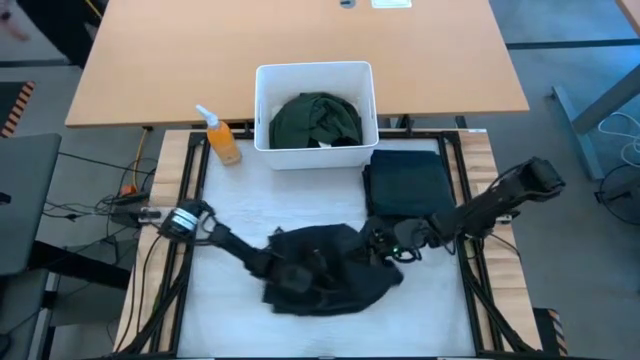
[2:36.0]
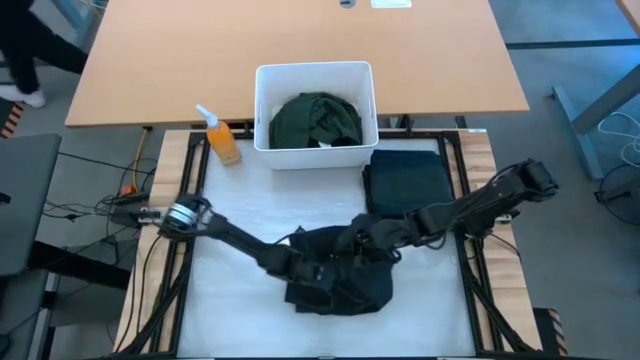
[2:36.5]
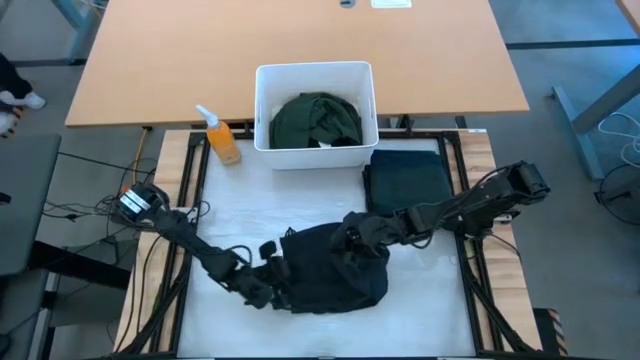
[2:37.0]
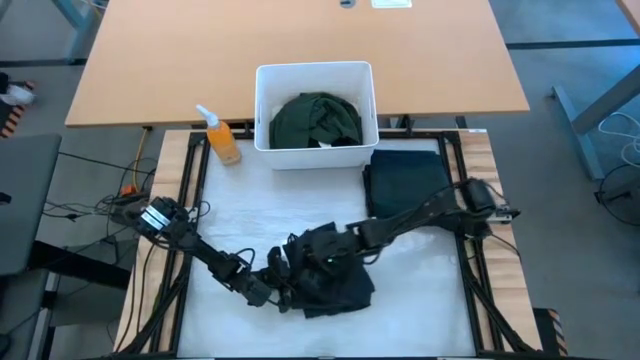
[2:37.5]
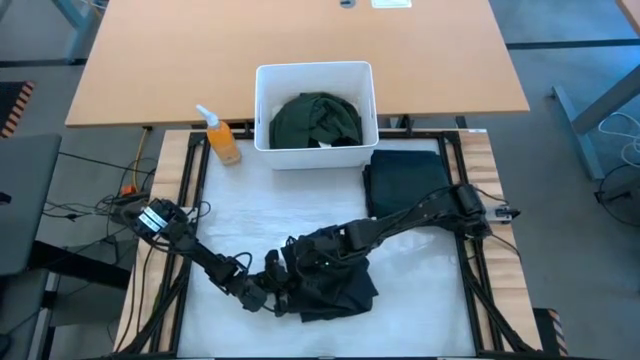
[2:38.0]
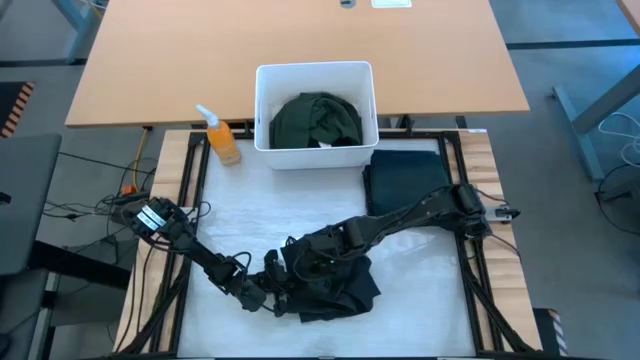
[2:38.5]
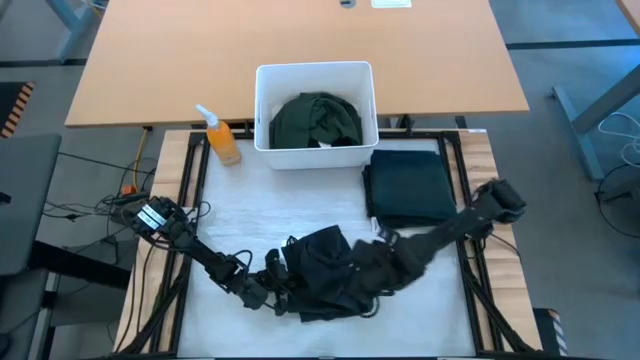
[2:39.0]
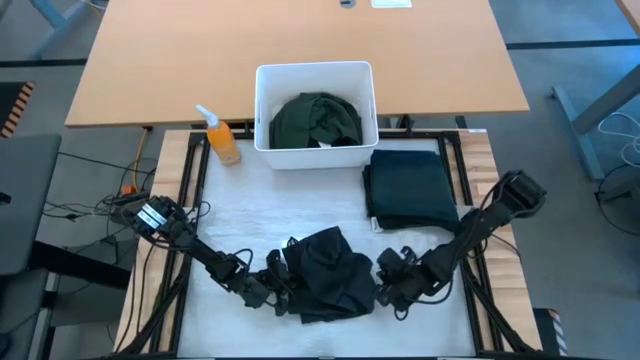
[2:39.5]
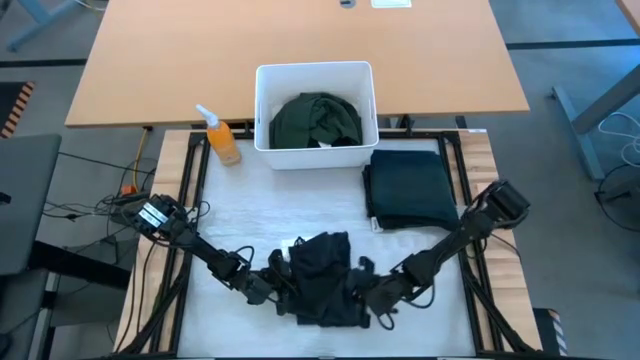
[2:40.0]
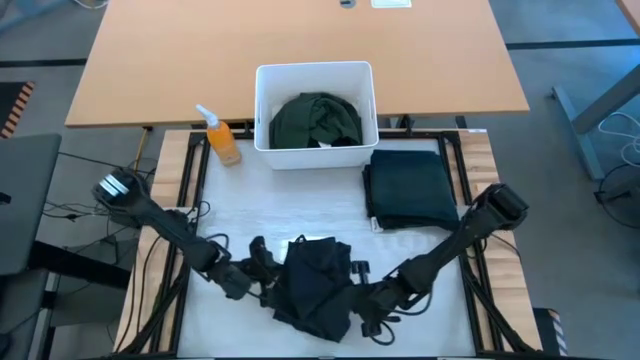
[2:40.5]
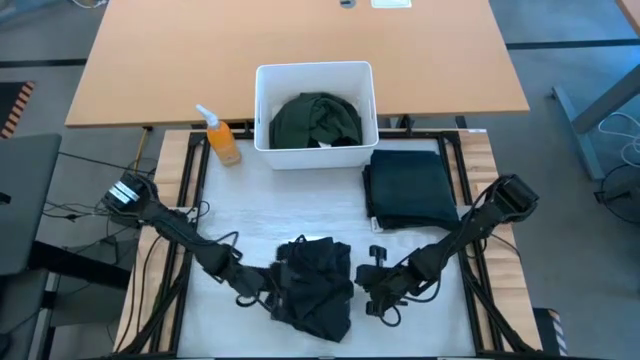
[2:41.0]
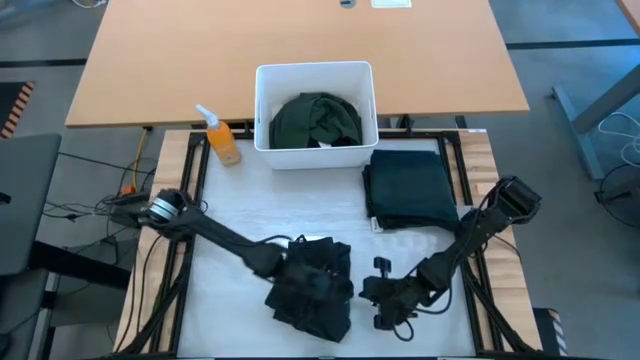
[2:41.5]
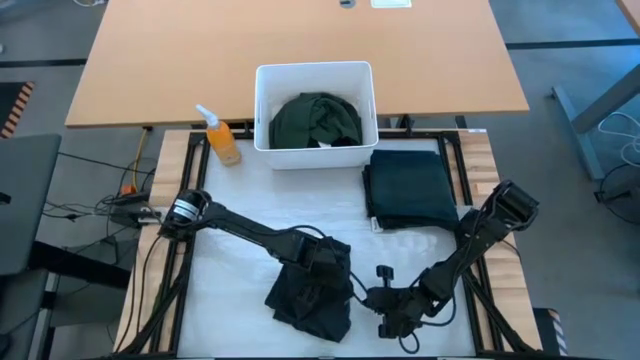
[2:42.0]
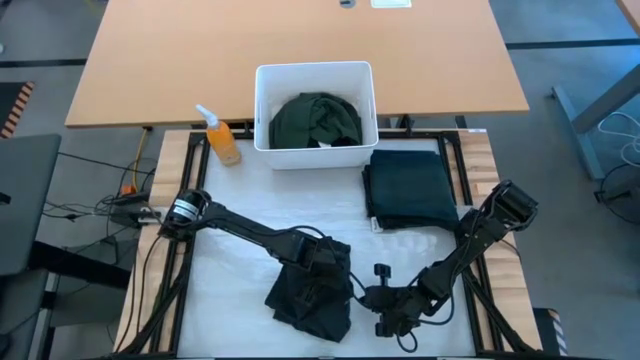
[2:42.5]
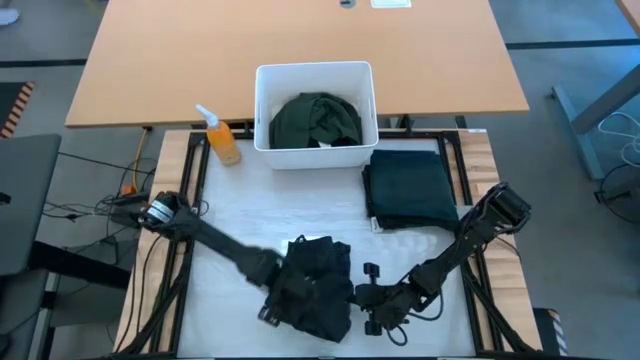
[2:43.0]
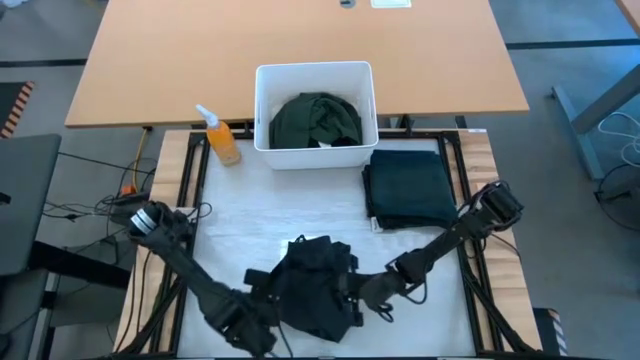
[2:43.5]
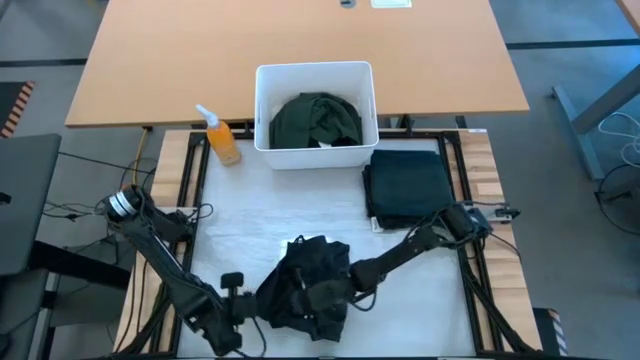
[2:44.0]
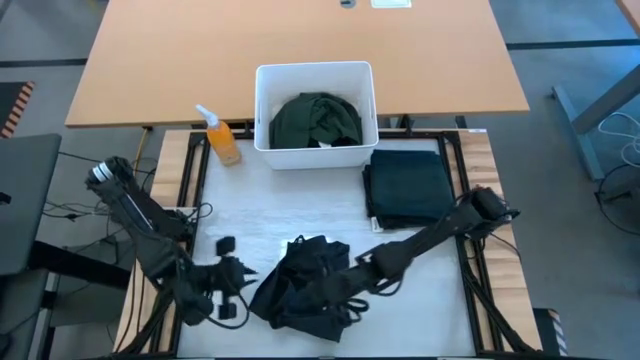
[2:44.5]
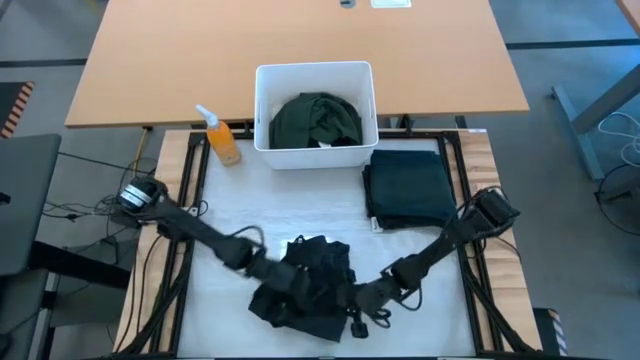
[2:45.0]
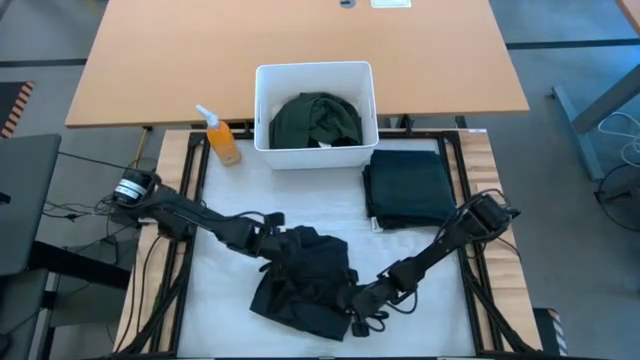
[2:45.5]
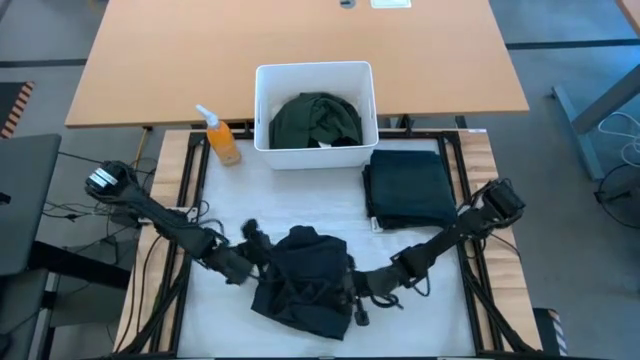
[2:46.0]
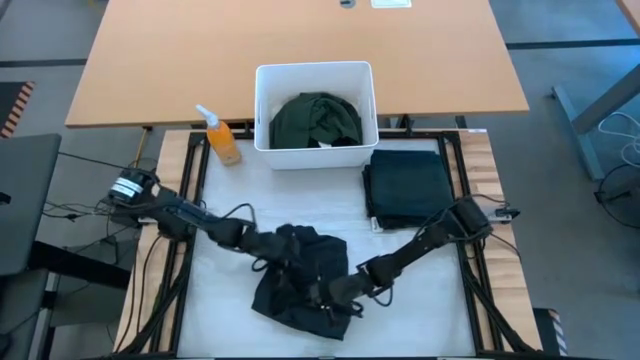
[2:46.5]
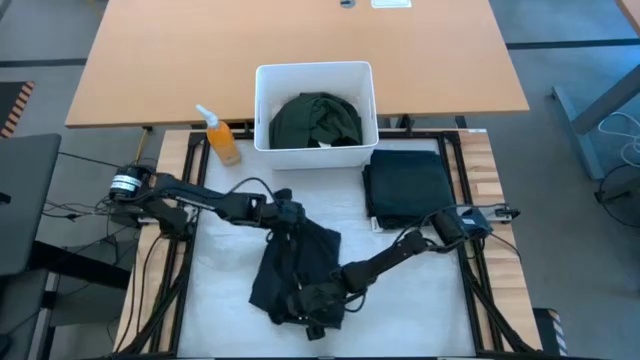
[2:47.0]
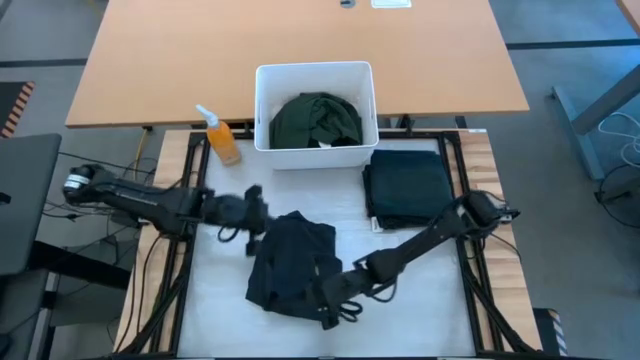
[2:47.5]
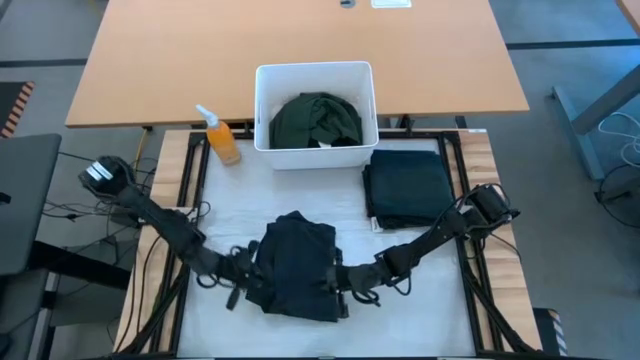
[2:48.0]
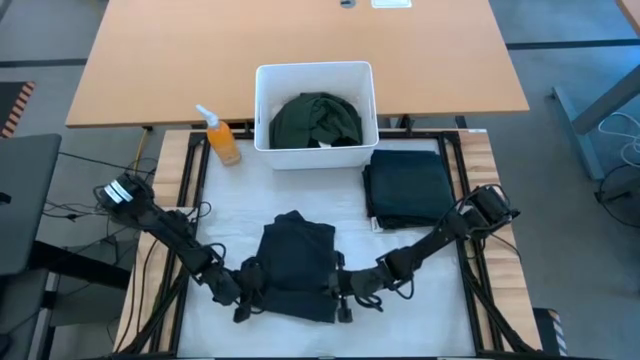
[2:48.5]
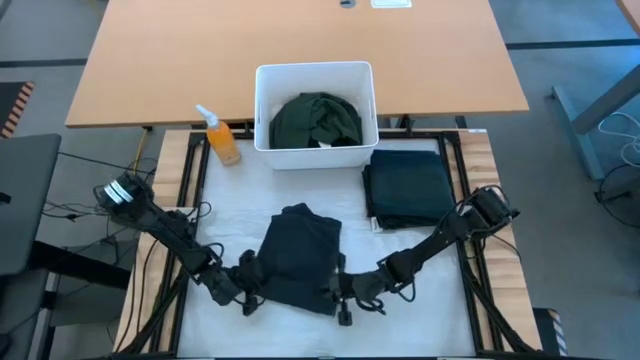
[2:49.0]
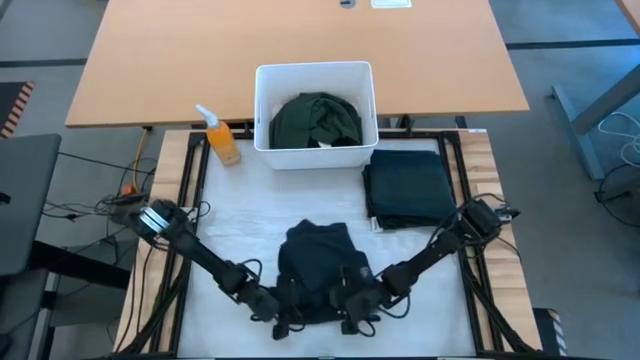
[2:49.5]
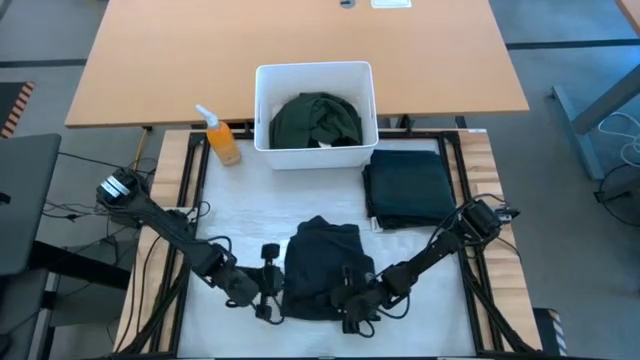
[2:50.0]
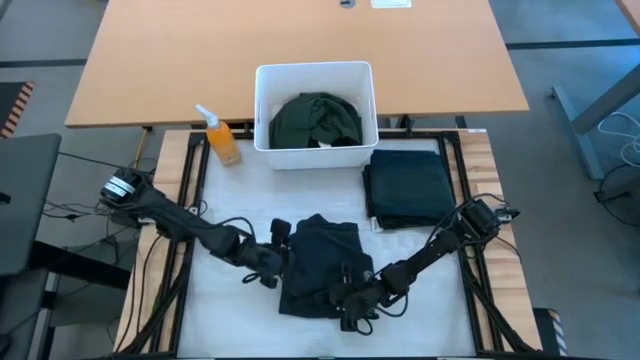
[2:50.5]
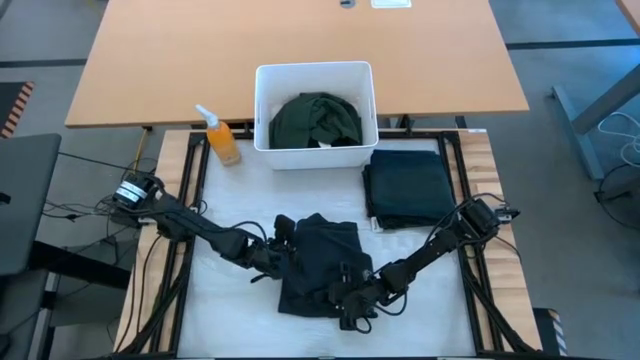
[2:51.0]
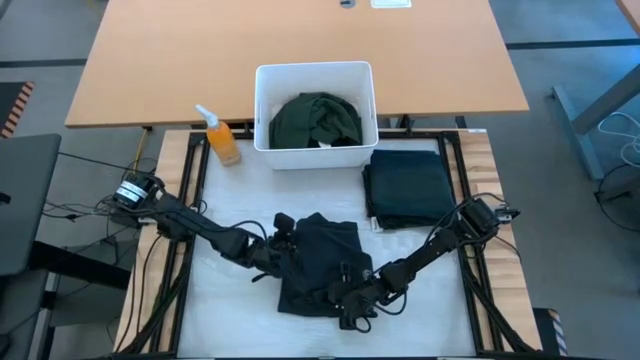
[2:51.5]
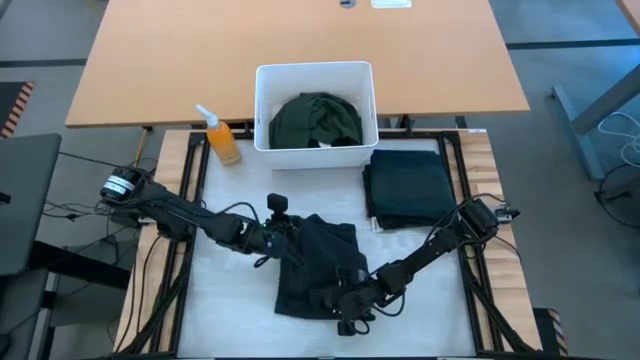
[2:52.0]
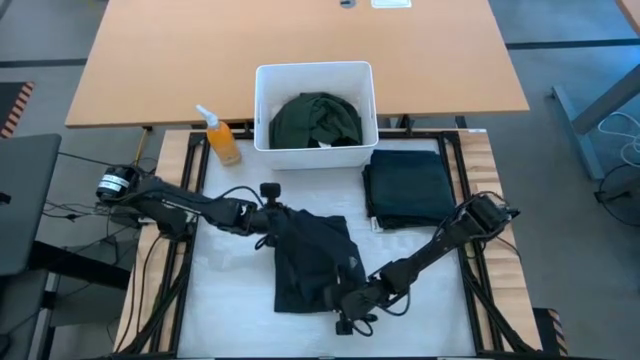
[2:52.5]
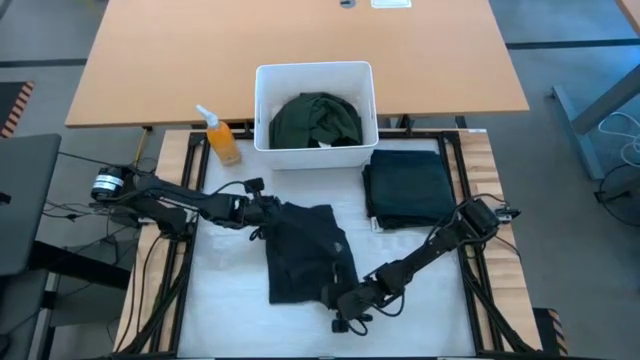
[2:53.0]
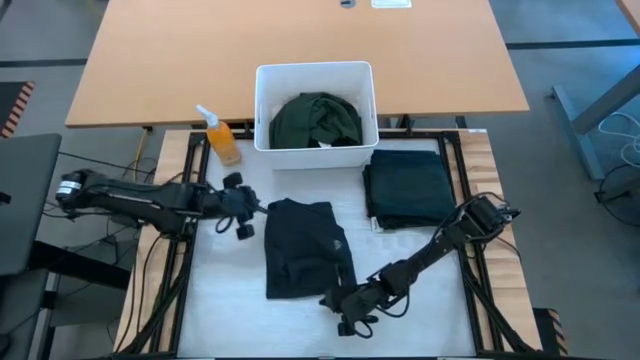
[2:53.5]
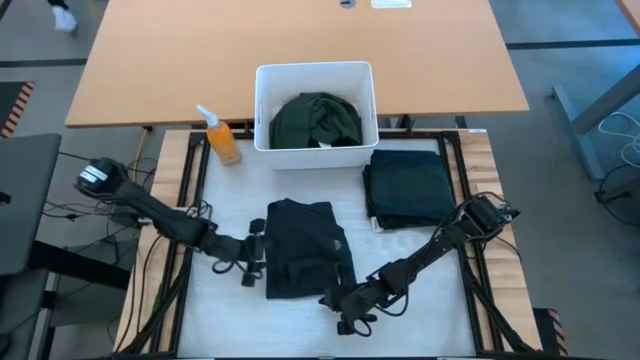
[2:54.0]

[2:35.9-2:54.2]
Task: Fold laundry
Fold the black shorts from the white laundry organizer

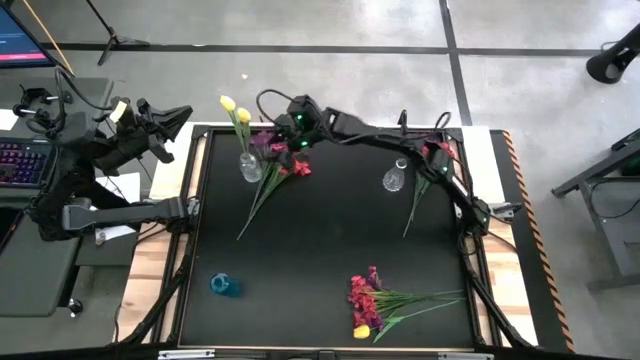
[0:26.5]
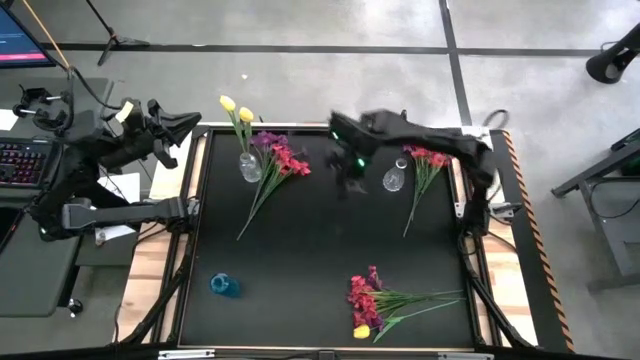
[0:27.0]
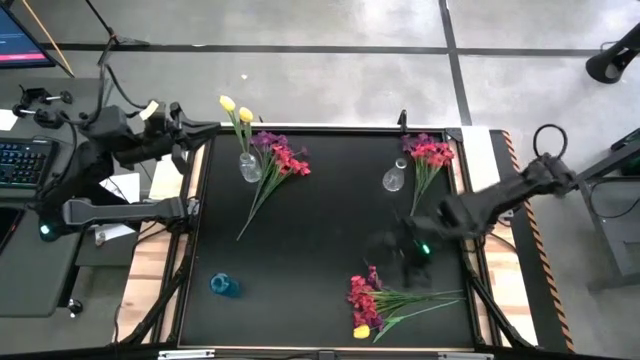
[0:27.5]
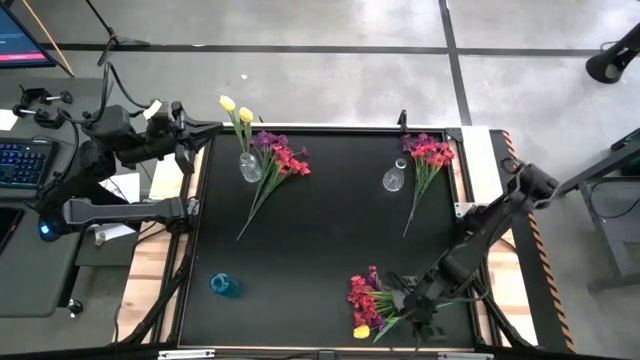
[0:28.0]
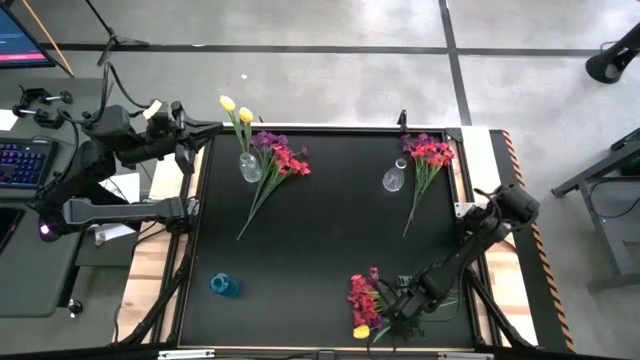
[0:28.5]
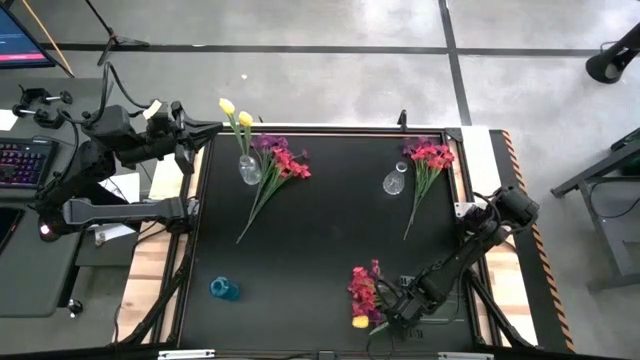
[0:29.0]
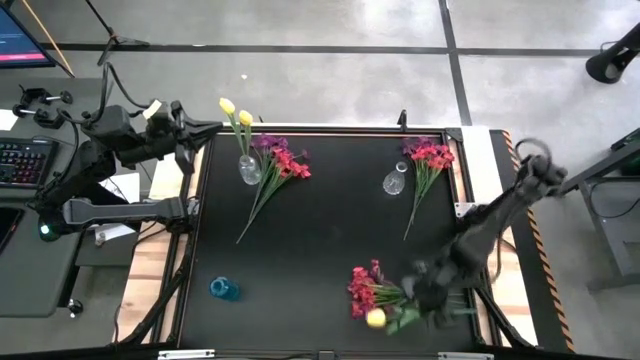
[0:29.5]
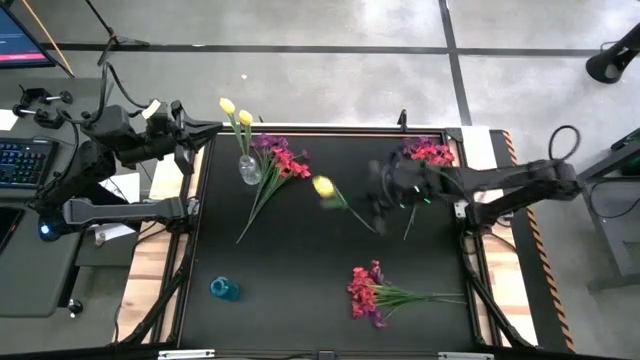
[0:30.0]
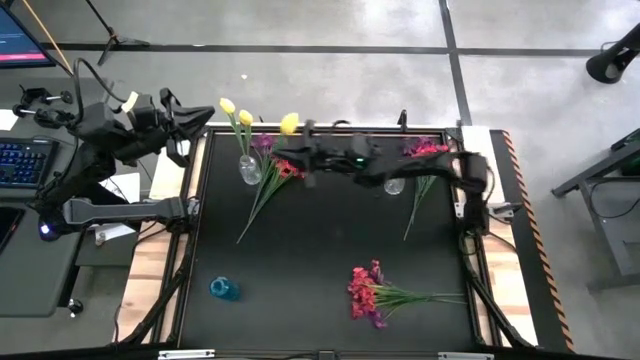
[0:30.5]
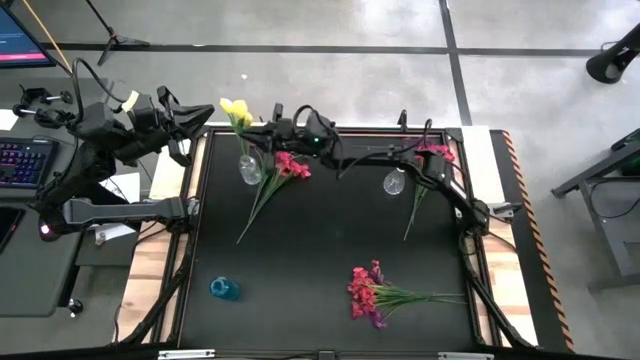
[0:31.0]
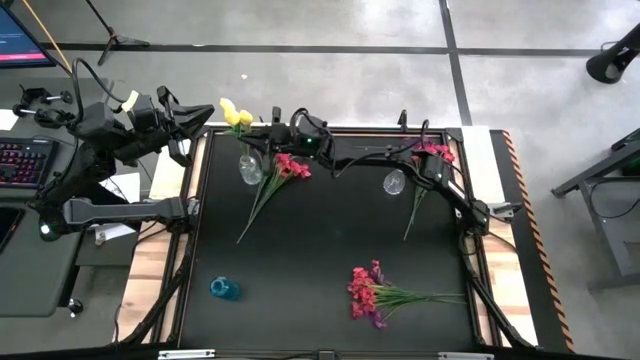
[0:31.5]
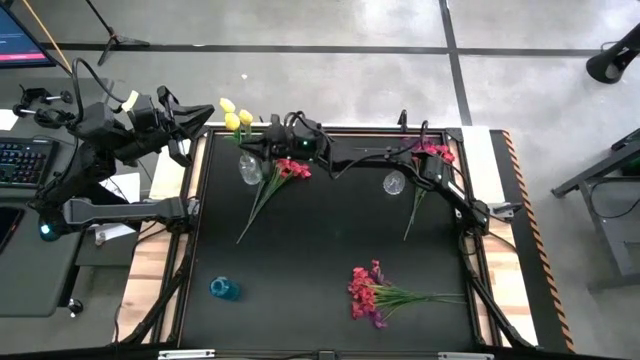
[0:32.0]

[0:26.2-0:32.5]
Task: Sort flowers into vase by color
Put the yellow flower into the left transparent vase
